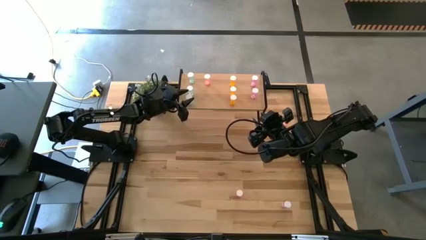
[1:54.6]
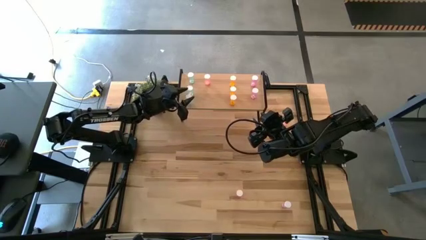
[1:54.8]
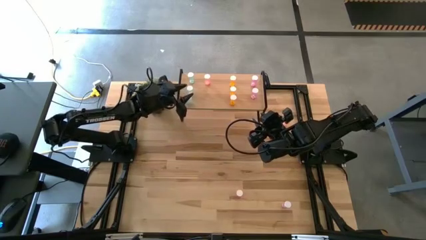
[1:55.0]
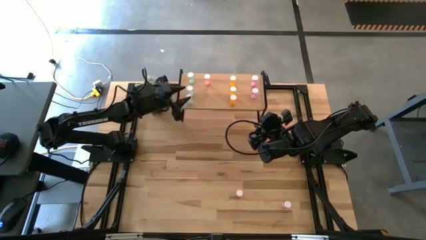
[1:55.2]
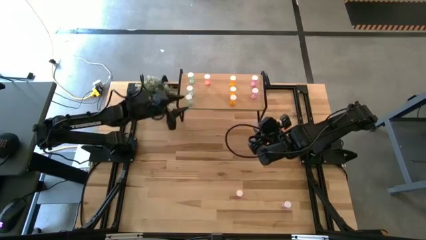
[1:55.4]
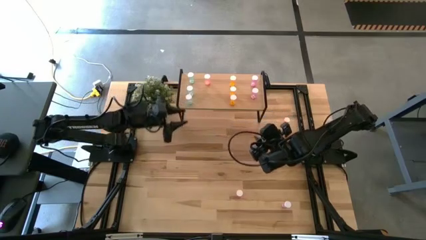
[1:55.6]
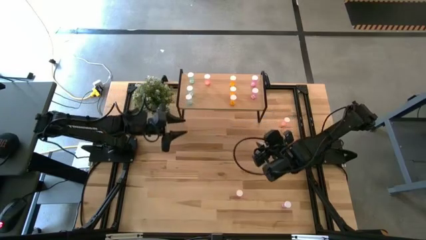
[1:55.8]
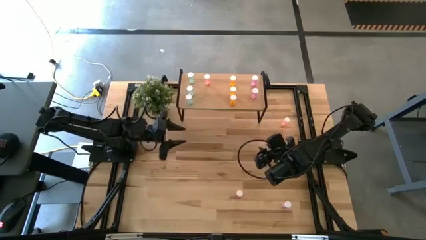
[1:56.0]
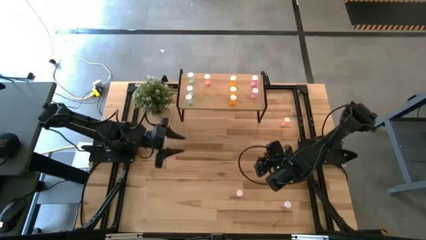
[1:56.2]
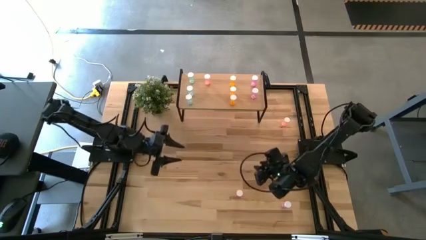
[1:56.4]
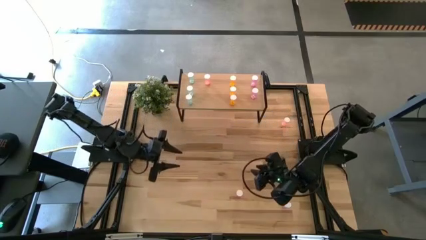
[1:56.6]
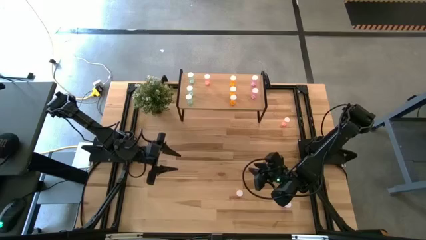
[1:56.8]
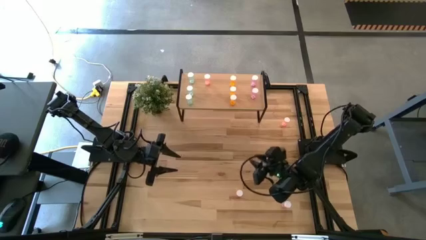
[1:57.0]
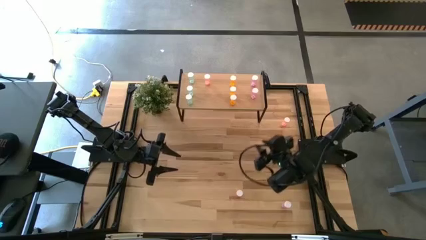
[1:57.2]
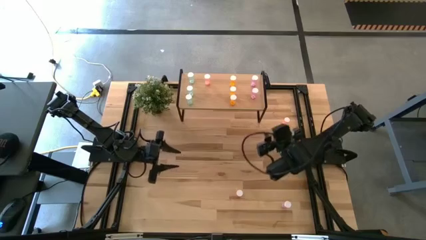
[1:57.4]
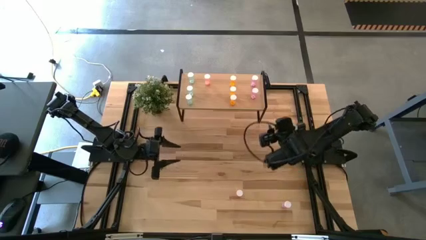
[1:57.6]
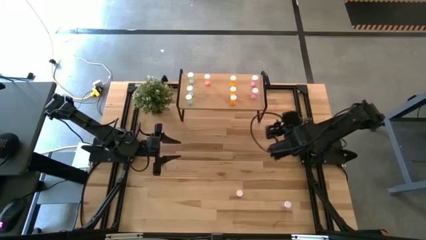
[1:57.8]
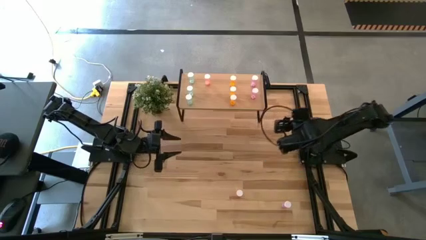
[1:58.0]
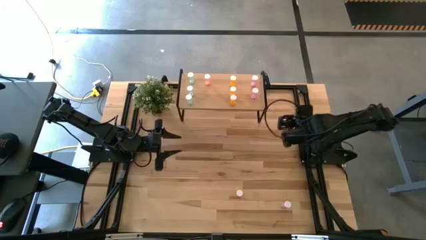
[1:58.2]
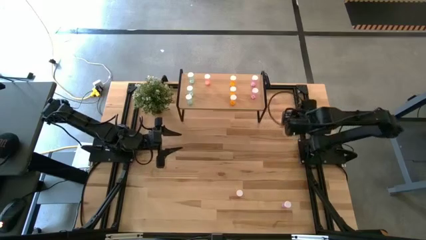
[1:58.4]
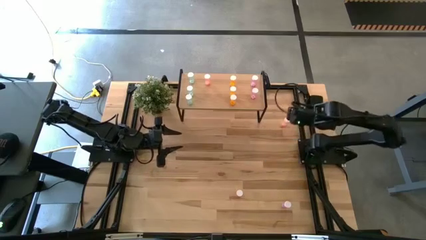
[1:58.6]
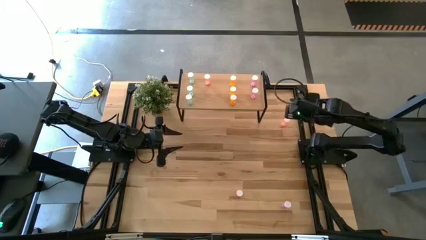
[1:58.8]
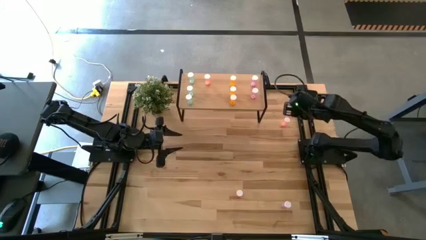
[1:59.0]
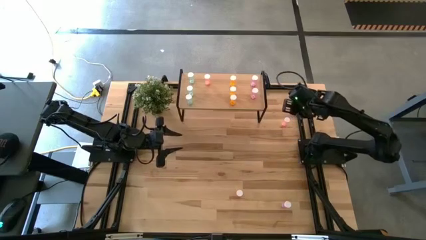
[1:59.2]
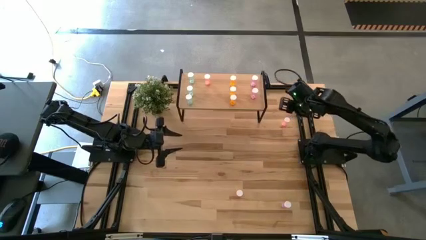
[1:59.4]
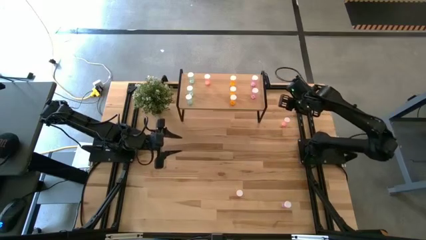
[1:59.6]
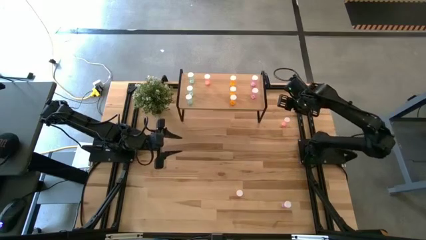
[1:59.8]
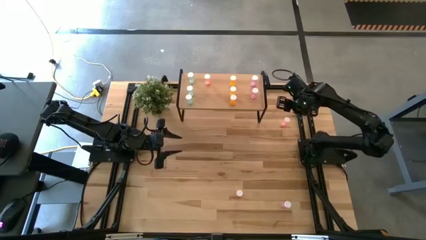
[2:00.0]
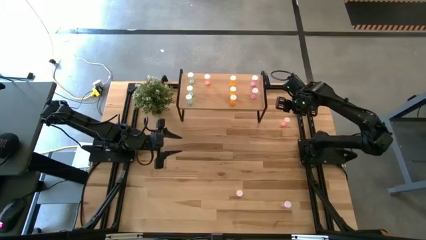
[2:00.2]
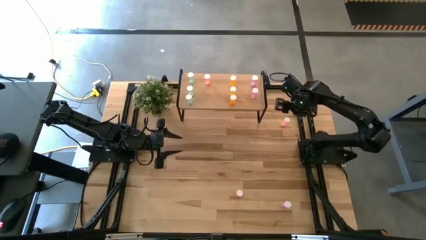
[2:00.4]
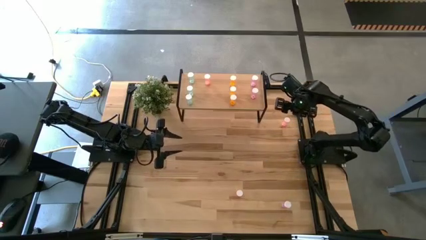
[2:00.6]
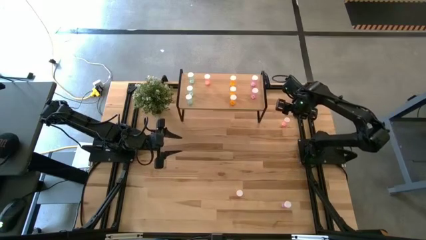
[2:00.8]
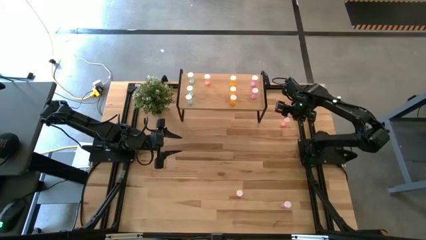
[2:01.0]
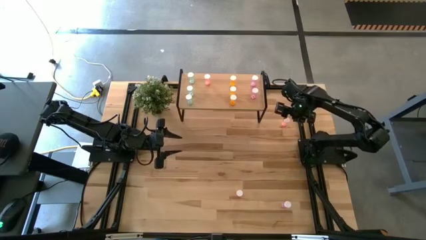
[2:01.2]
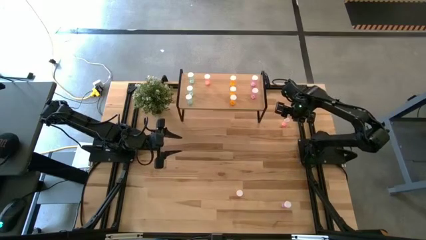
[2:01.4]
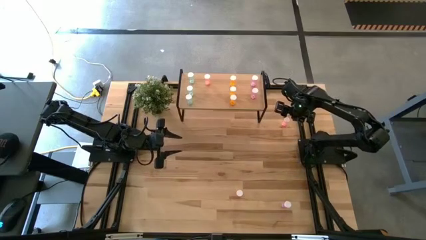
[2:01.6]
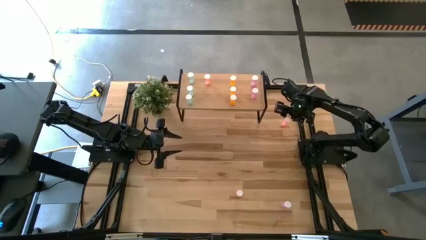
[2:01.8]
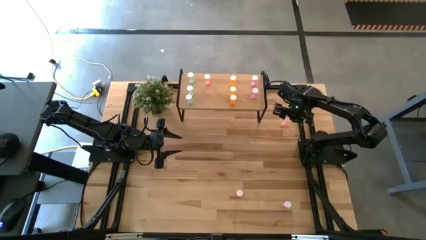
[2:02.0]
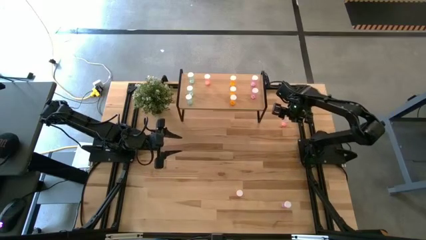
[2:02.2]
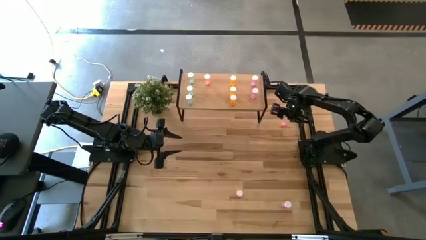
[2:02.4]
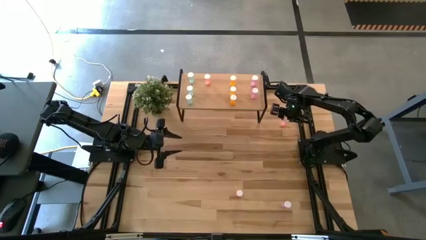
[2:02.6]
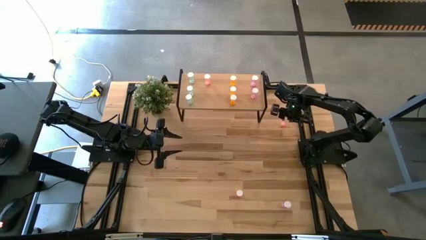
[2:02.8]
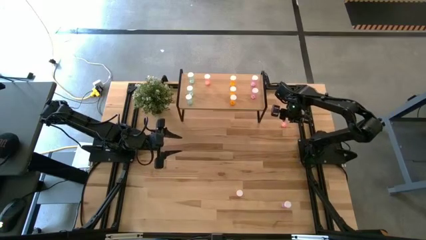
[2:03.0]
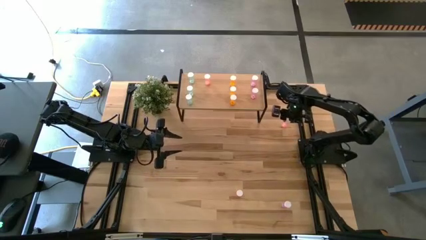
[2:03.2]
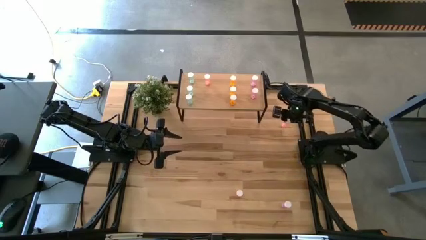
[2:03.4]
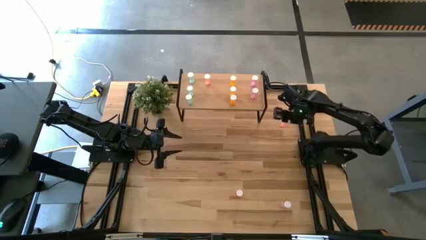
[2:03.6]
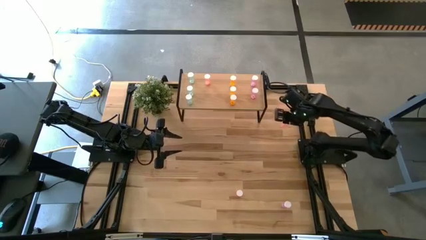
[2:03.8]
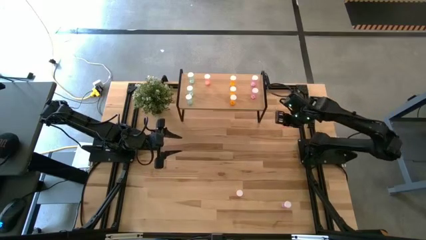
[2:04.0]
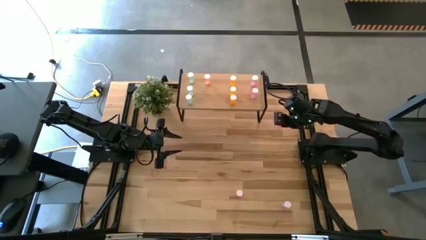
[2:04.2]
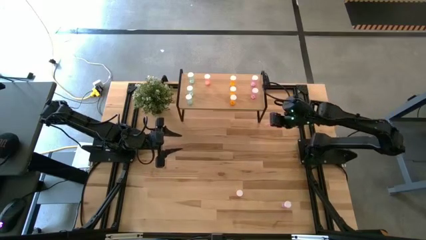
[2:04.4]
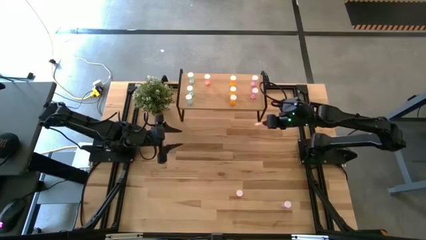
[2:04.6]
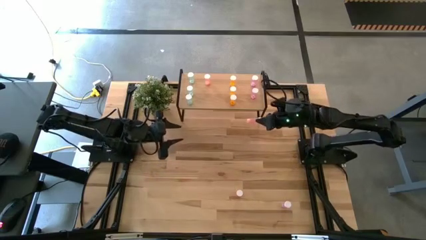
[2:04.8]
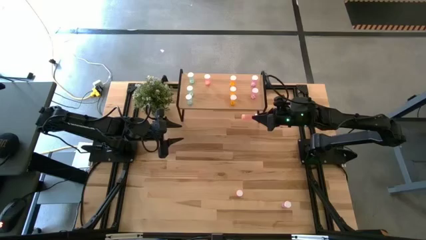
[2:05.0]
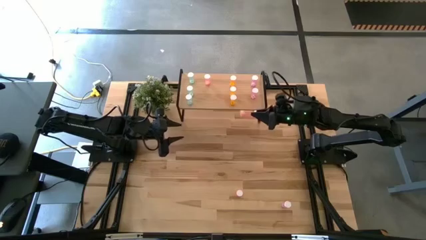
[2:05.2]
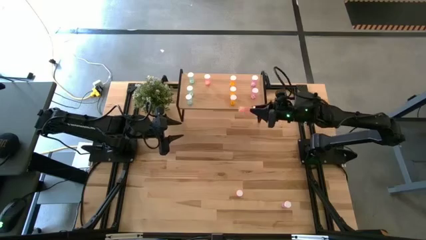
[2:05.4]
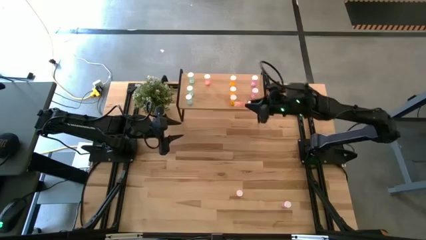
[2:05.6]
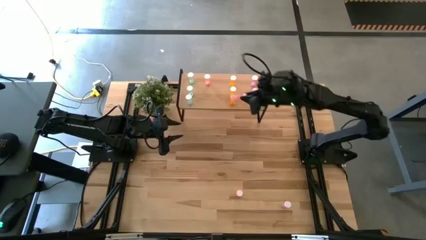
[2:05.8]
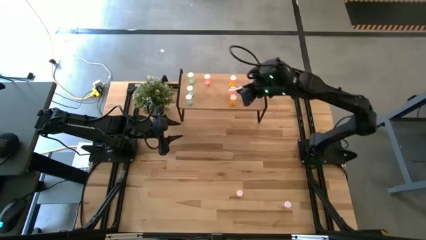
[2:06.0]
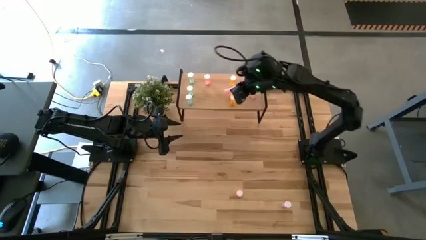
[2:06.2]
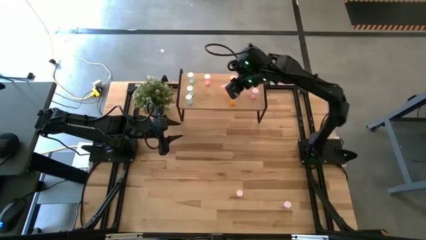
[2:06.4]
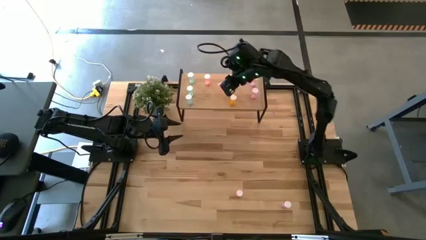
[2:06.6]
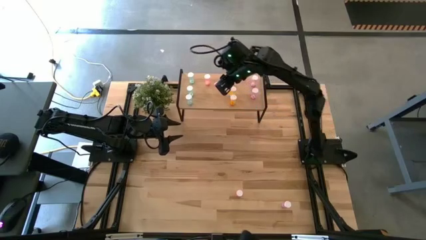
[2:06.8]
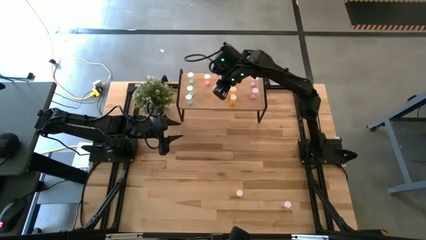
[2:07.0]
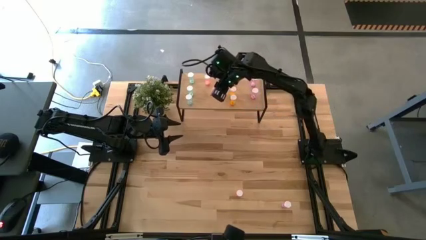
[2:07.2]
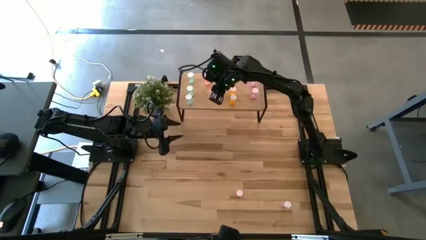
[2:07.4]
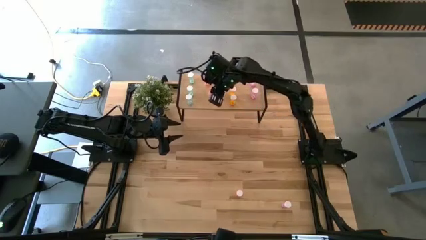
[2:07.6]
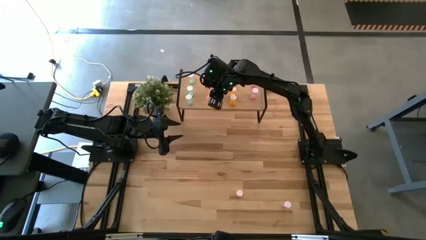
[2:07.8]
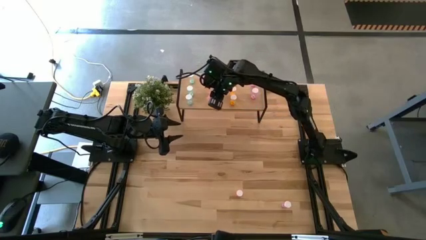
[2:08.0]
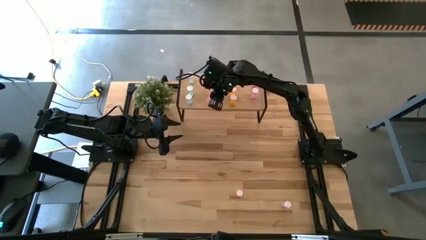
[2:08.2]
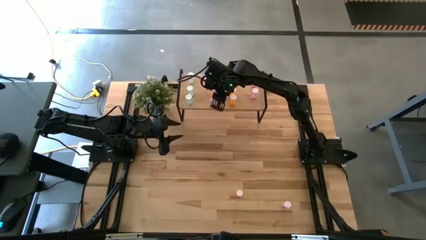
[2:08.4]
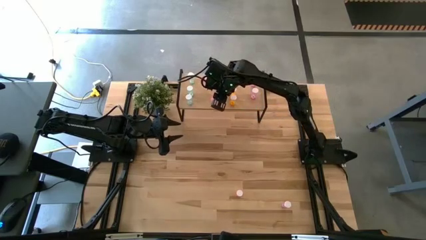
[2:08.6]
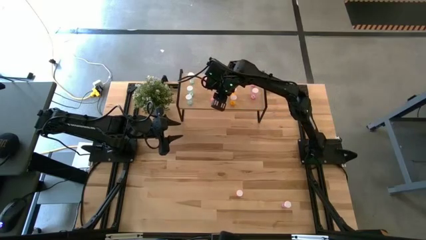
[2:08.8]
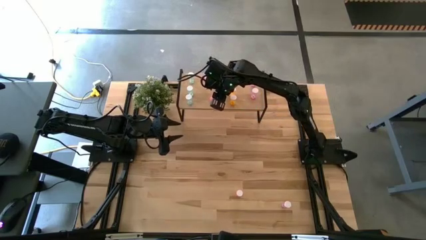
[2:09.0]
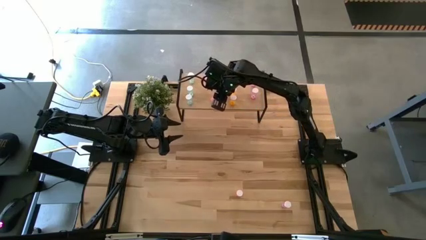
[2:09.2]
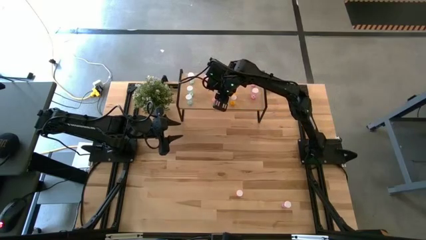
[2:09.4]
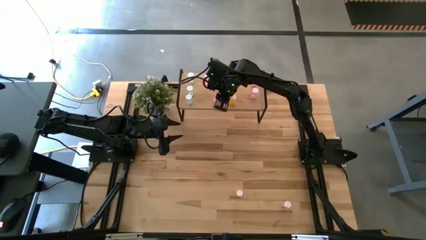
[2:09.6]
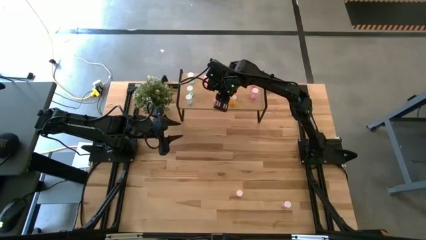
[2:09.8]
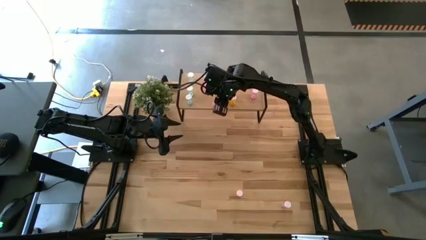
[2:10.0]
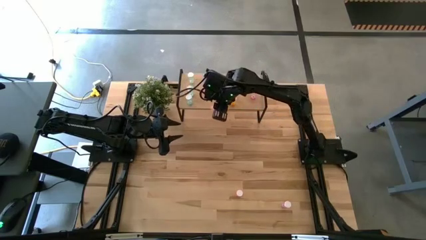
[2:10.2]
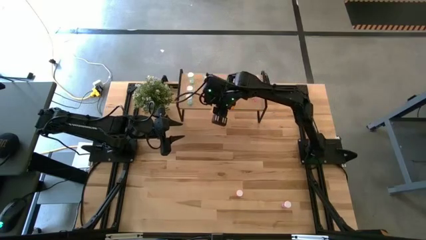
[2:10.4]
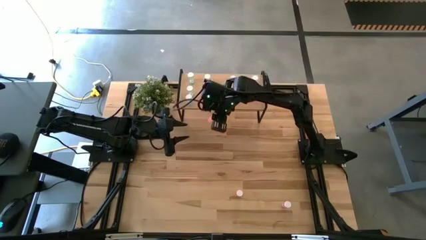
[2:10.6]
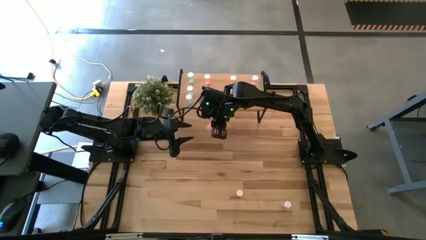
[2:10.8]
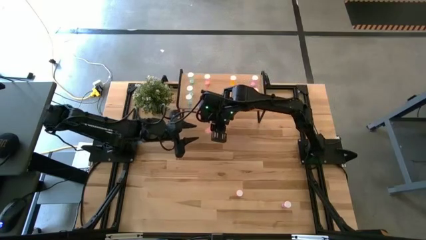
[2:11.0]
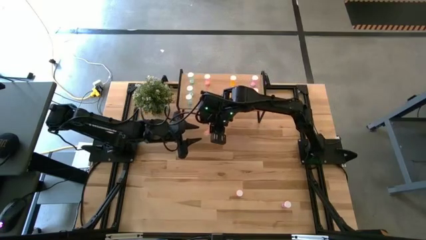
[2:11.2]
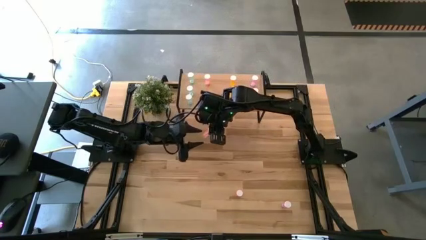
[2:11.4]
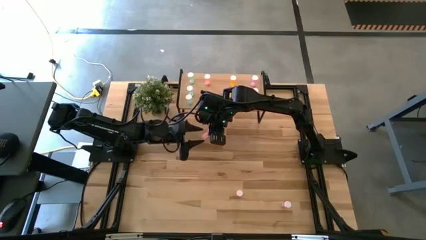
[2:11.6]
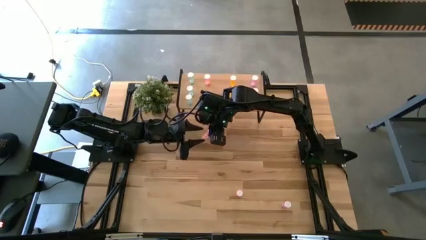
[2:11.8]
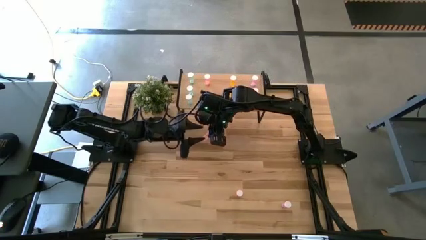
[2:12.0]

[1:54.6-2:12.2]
Task: Pick and place medicine bottles onto shelf by color
Put the top pink pill bottle on the shelf aligned with the other pink pill bottle
